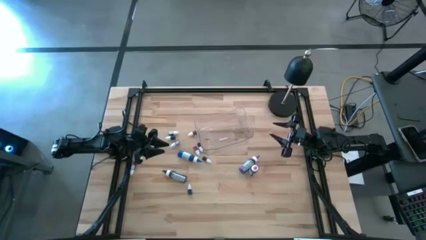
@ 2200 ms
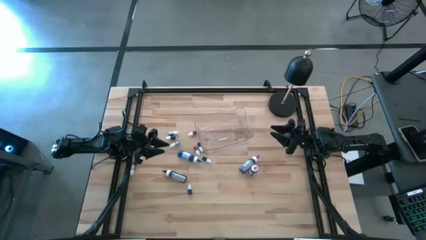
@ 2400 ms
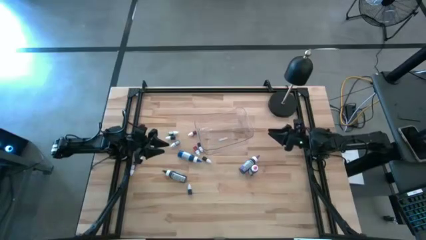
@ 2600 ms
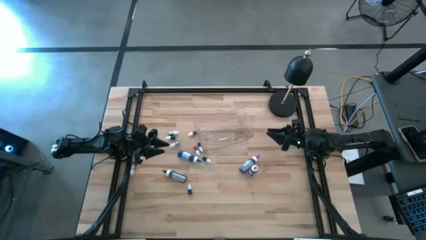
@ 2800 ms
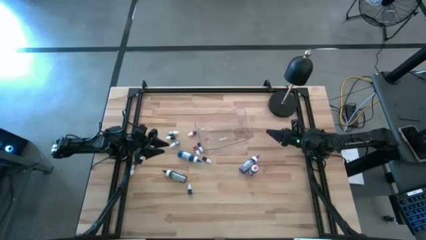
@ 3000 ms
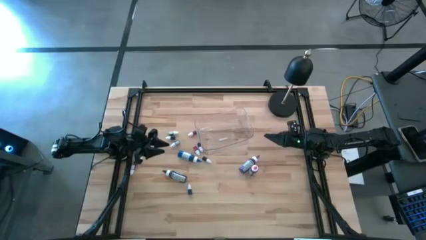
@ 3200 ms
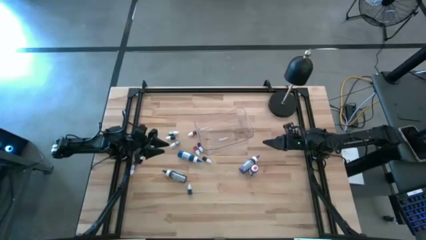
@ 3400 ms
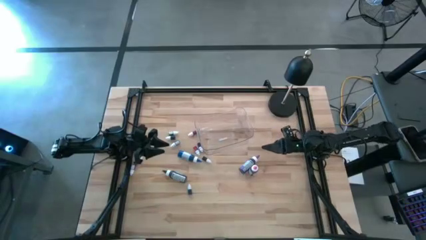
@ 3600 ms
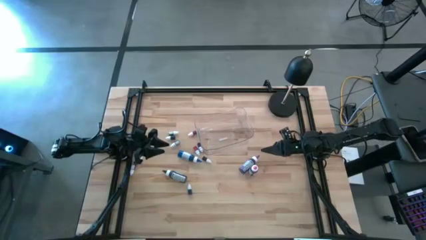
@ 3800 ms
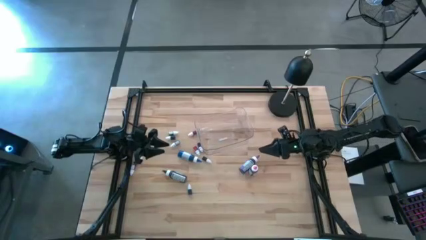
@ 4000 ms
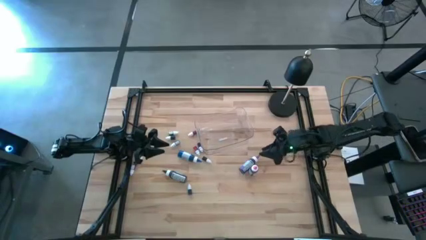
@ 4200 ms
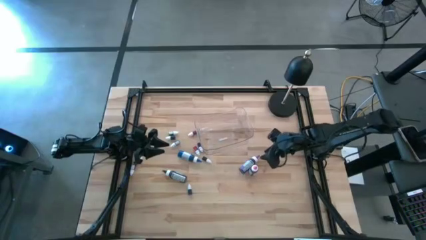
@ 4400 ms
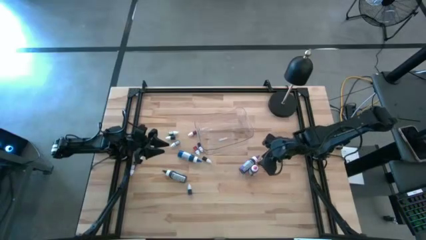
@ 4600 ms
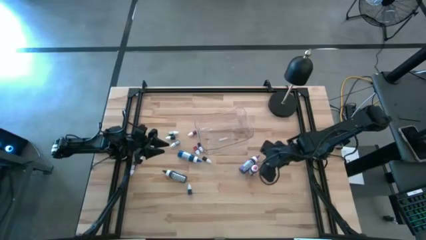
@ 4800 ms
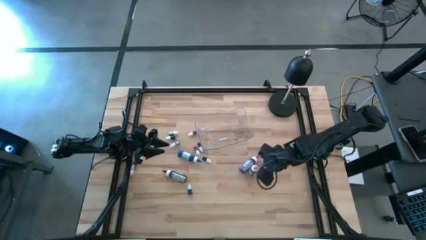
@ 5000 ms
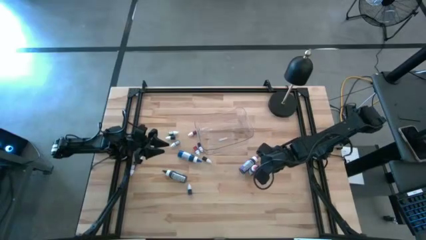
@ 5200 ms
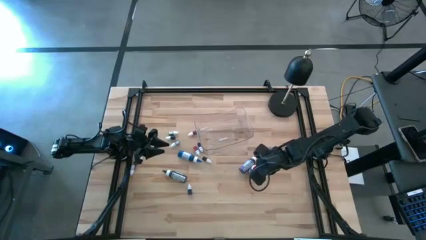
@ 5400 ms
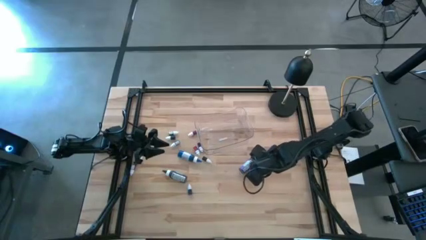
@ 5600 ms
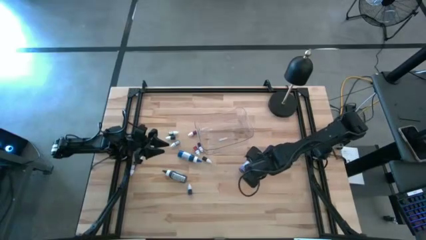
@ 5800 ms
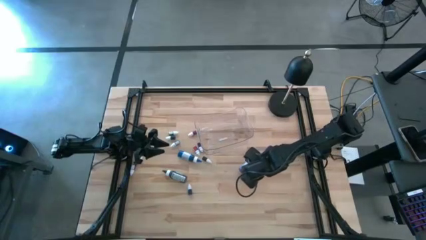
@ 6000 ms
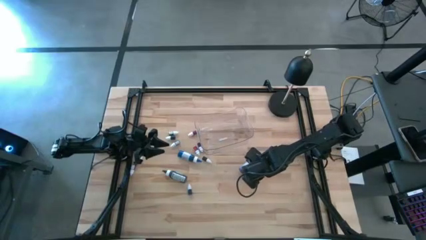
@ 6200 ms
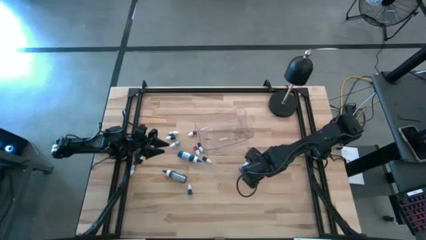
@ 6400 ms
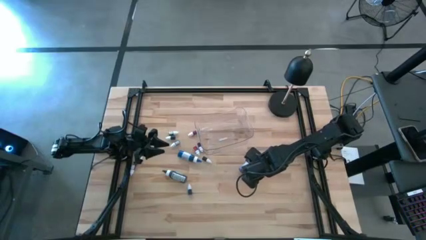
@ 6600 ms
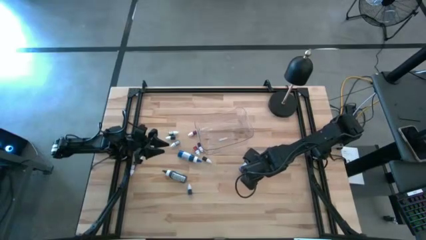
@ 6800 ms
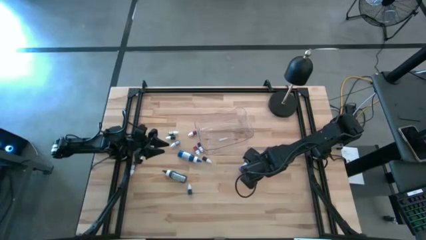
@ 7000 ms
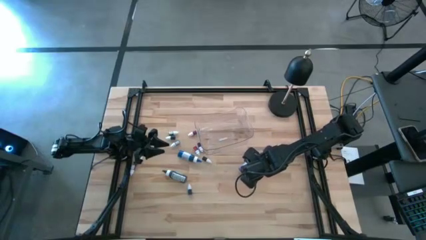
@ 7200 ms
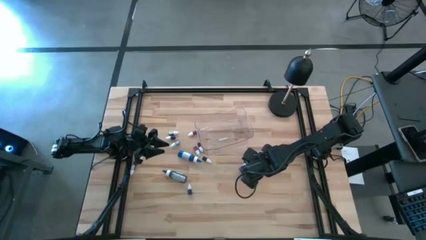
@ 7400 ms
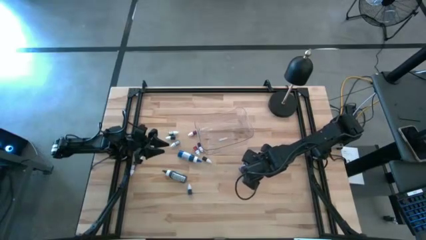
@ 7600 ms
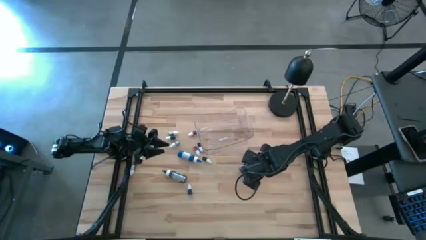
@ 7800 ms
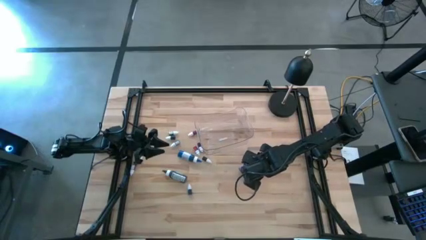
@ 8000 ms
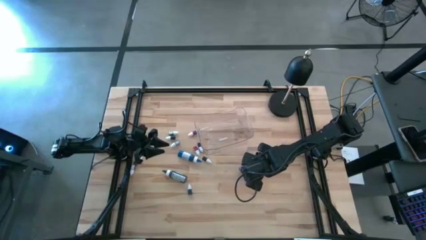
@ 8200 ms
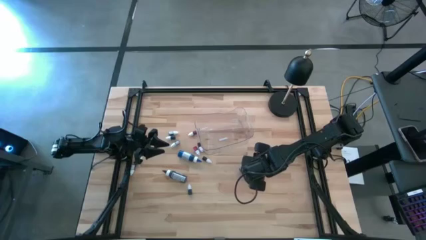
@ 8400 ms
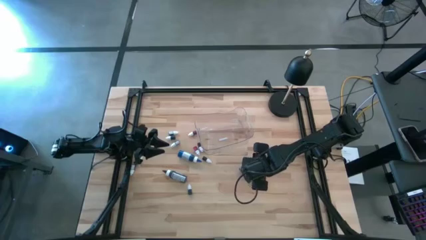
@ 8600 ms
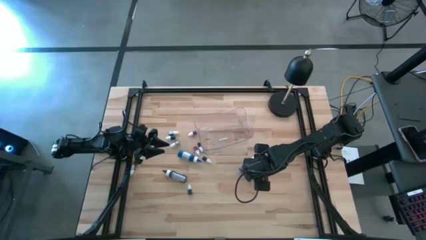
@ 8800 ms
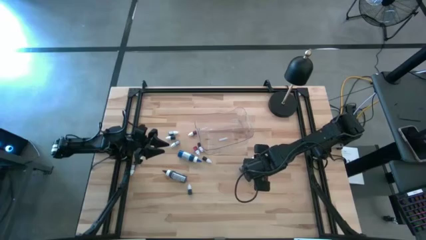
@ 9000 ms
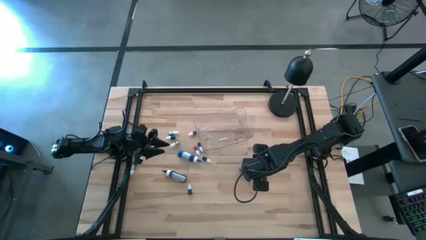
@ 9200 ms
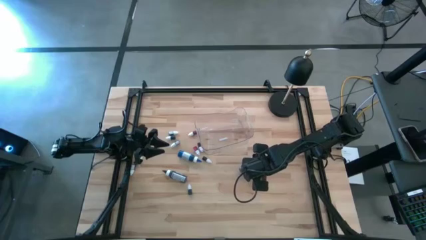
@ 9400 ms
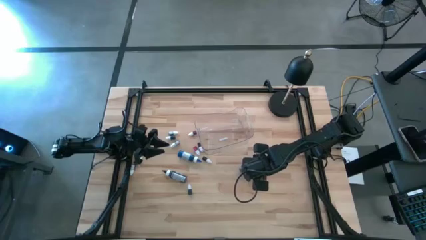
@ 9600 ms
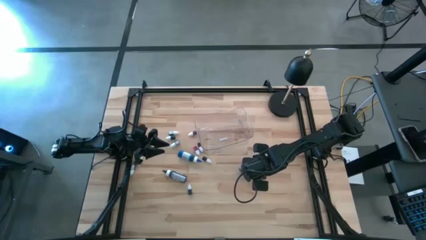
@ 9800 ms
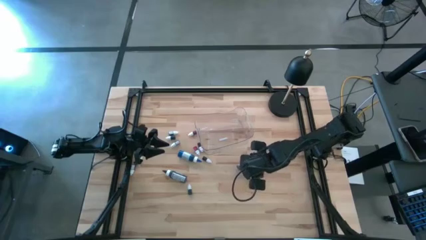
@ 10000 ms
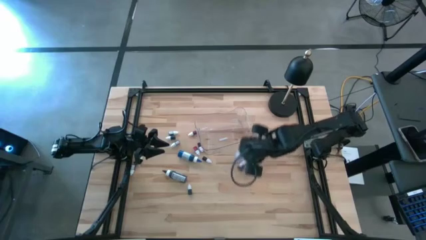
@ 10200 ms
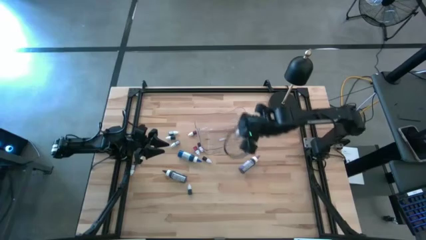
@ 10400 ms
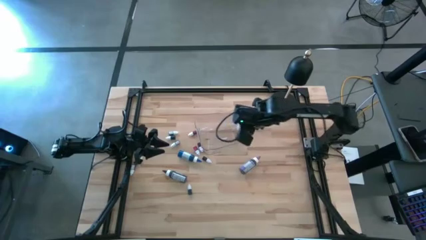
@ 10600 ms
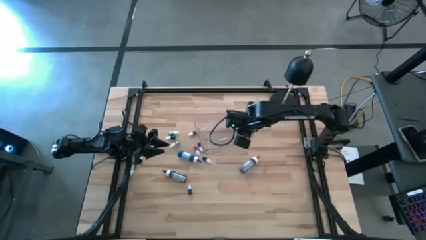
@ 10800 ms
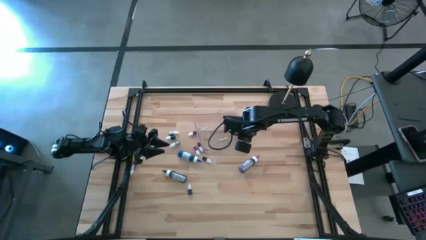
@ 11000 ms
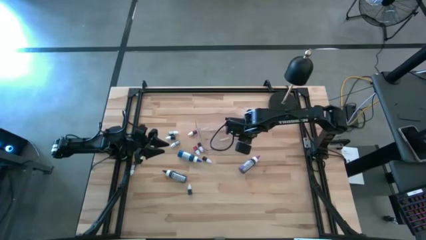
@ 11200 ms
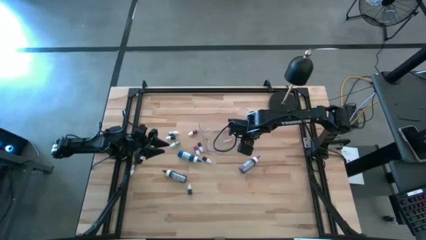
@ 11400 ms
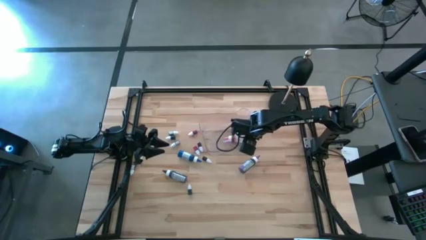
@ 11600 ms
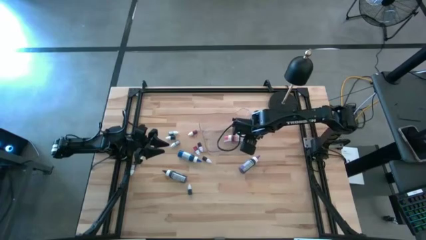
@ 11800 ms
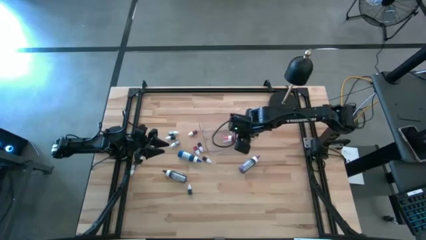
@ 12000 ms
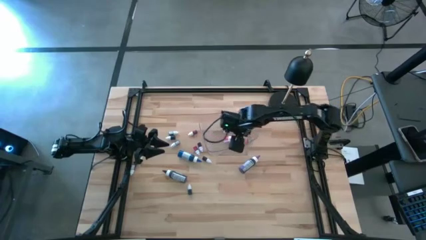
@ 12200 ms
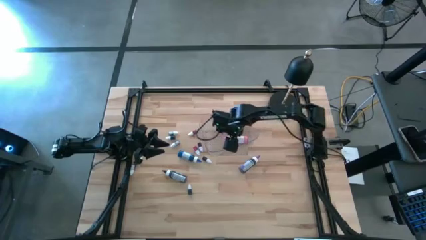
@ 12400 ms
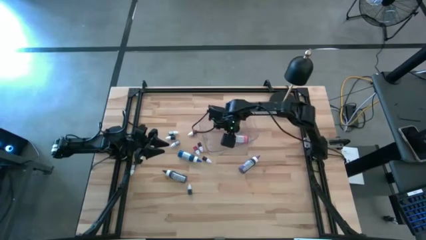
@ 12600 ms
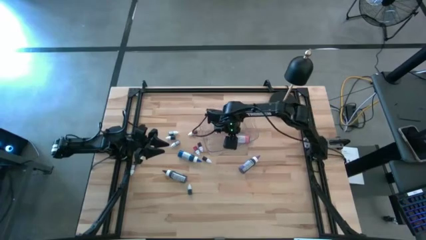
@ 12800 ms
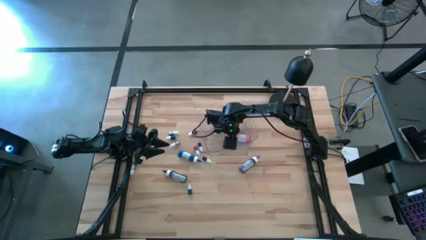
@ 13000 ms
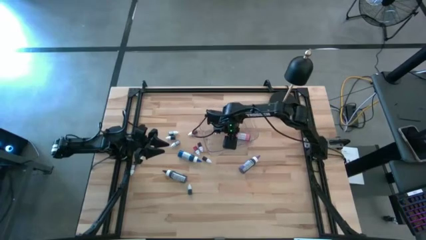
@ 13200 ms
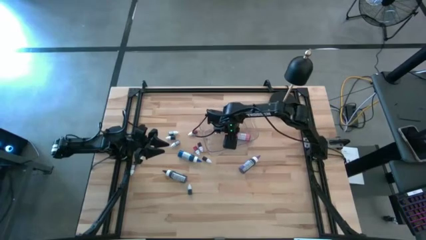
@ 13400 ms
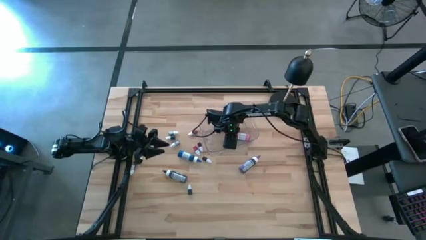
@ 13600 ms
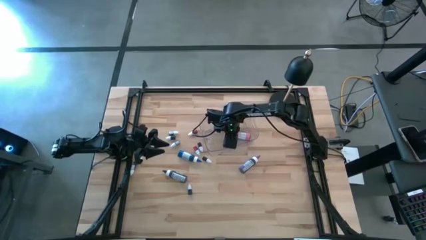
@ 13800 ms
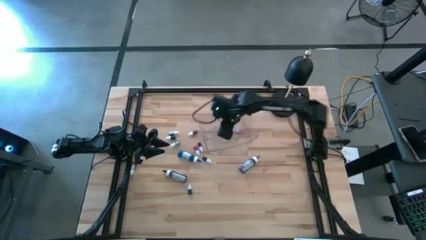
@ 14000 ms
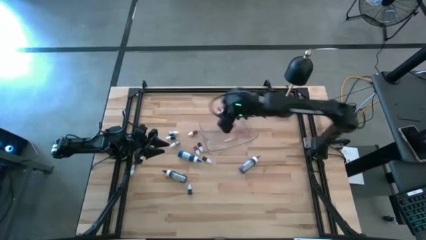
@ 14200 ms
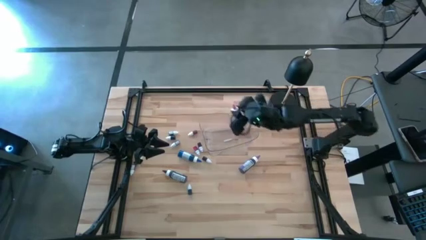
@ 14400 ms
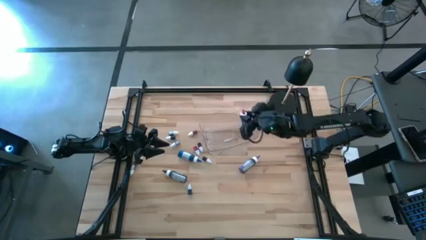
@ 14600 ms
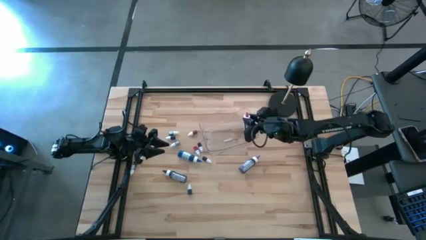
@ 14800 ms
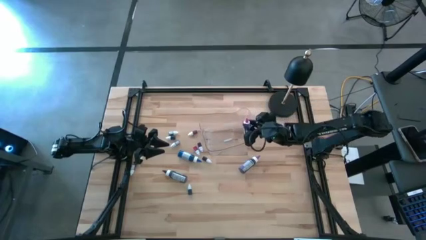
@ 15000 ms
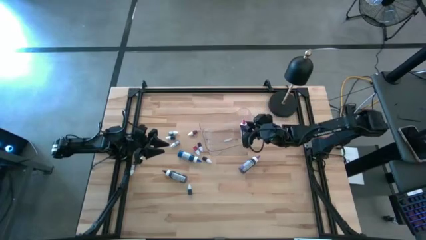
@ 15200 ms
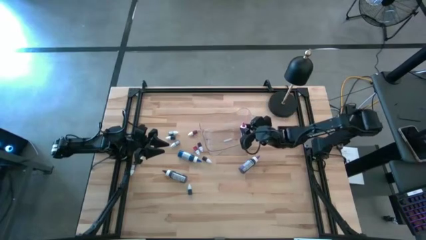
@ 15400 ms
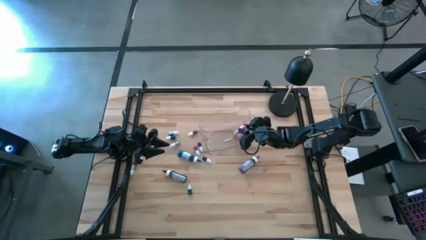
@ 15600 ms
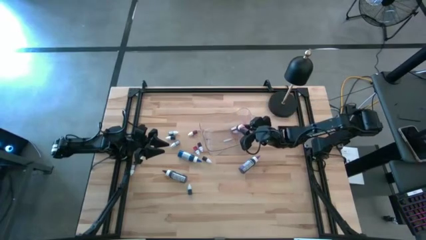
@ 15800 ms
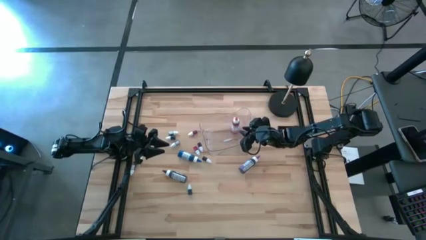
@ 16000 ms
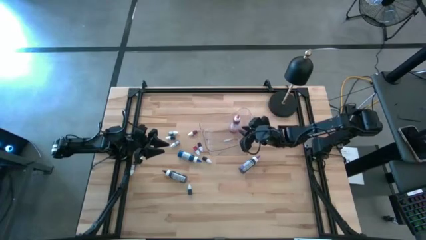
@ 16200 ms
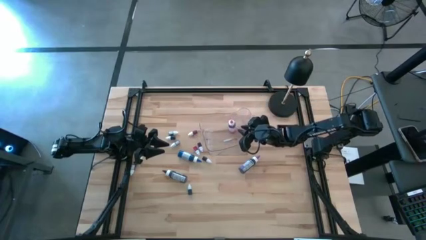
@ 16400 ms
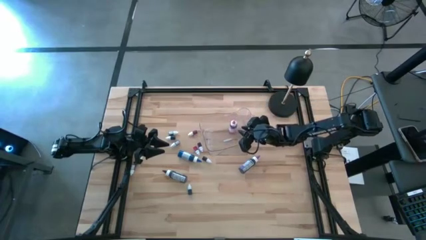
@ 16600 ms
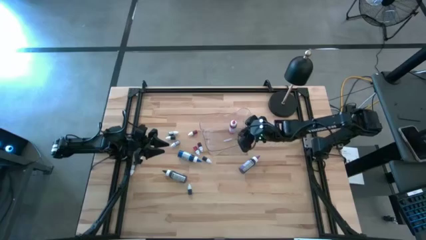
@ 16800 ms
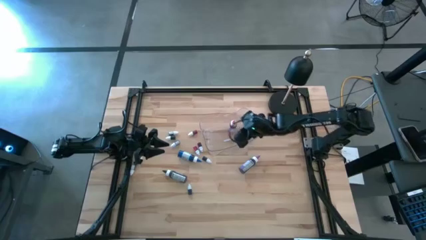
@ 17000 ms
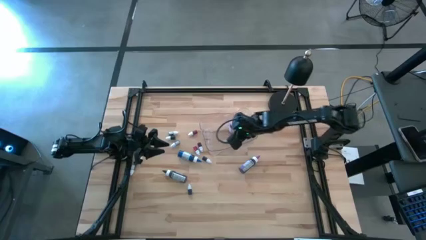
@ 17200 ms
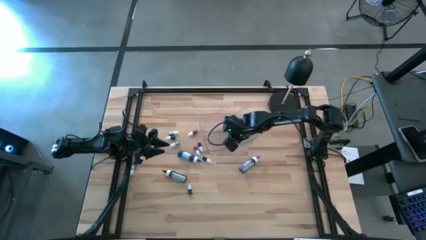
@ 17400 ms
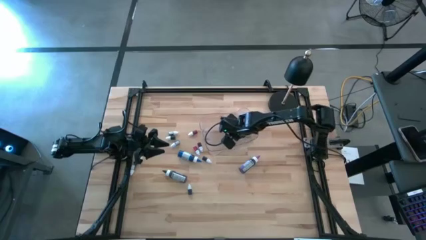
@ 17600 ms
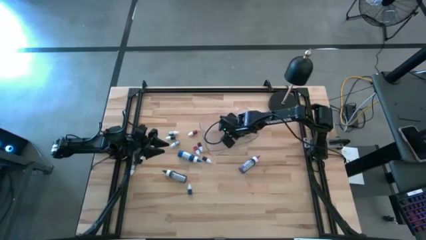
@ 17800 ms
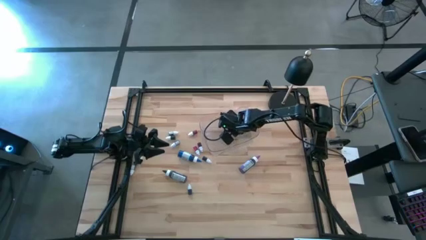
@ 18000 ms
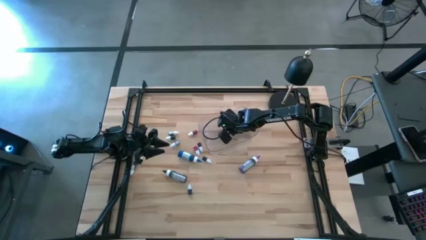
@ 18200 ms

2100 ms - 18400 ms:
Task: Pick & Place food coloring
Put the large pink food coloring bottle into the transparent container

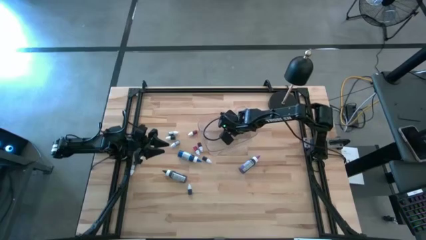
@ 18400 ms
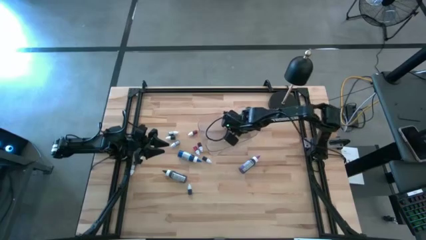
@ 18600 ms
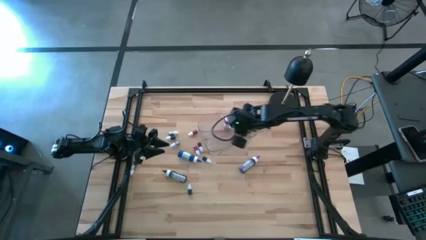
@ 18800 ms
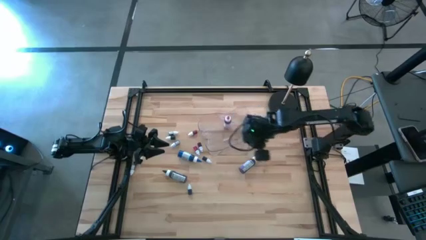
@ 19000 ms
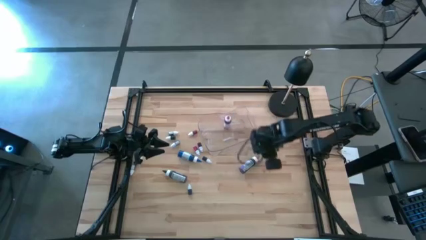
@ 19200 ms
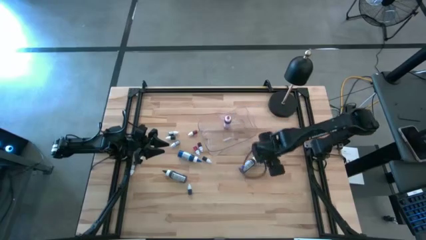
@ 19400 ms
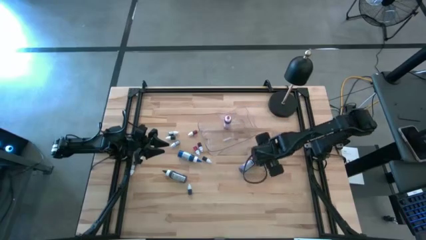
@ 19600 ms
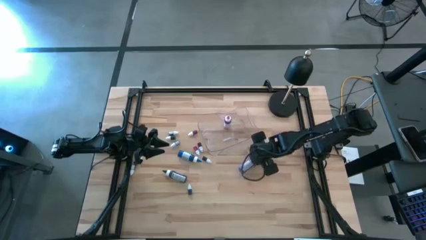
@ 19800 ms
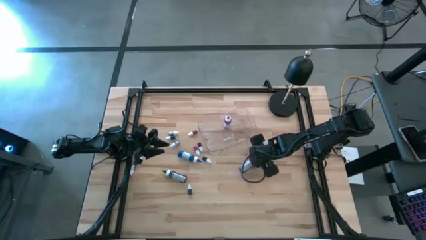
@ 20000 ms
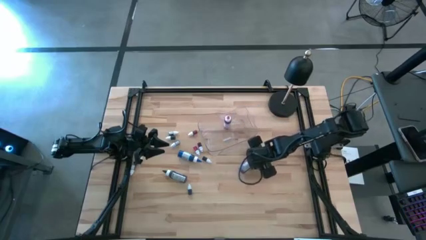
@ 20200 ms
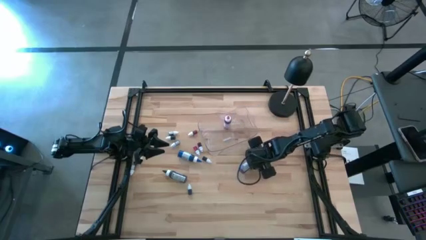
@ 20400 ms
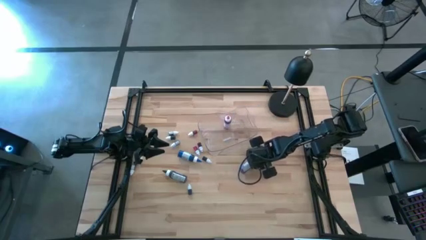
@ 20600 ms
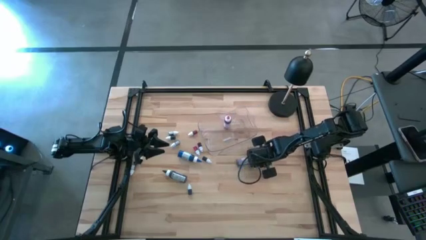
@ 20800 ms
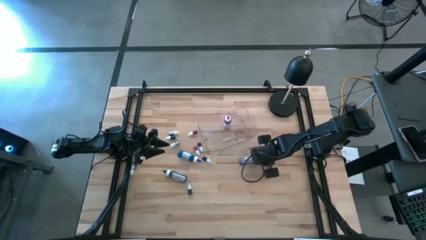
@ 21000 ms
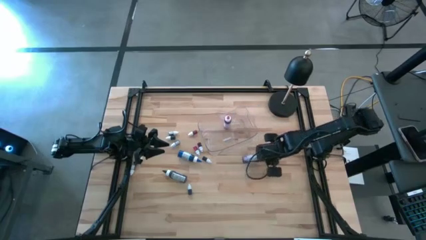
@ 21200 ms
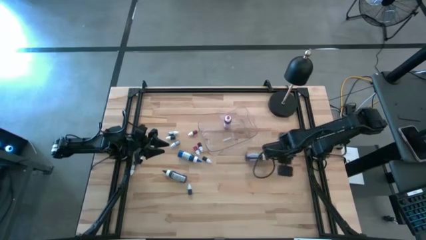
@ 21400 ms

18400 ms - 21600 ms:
Put the large purple food coloring bottle into the transparent container
